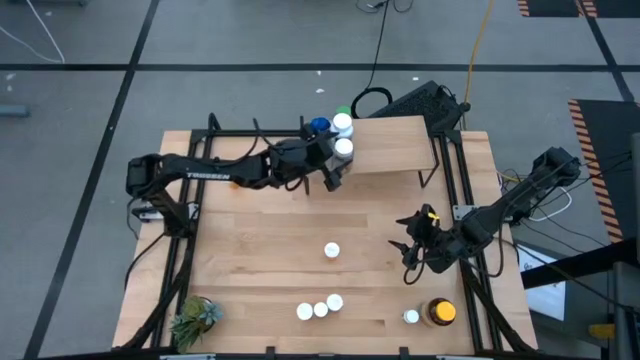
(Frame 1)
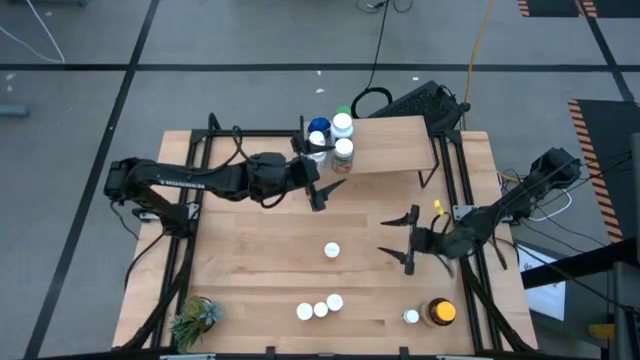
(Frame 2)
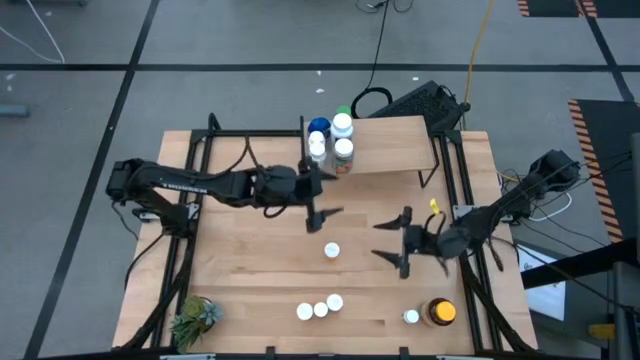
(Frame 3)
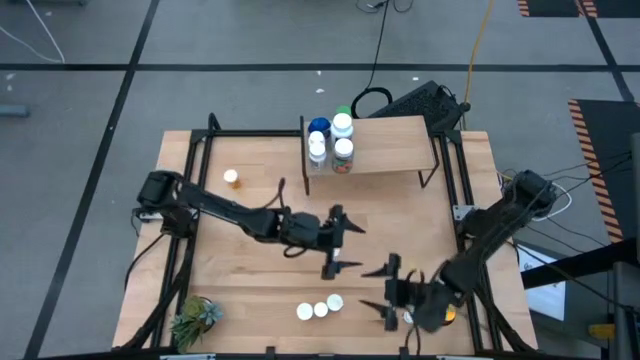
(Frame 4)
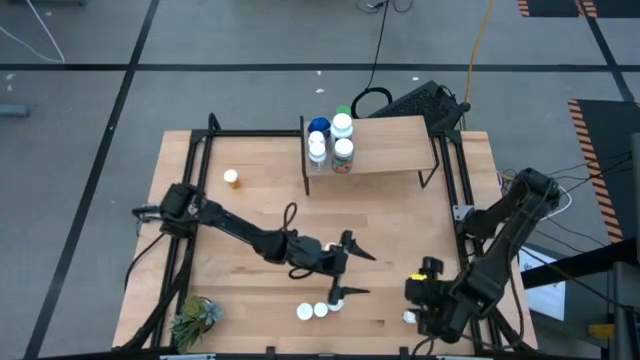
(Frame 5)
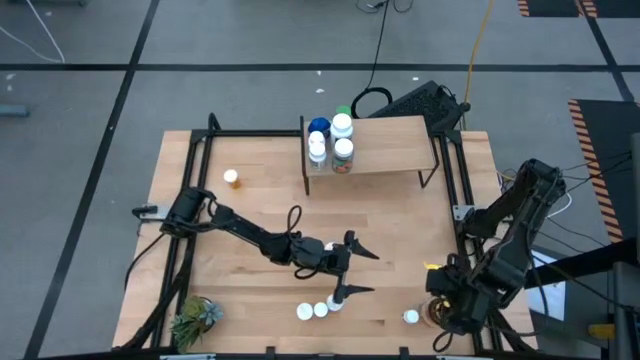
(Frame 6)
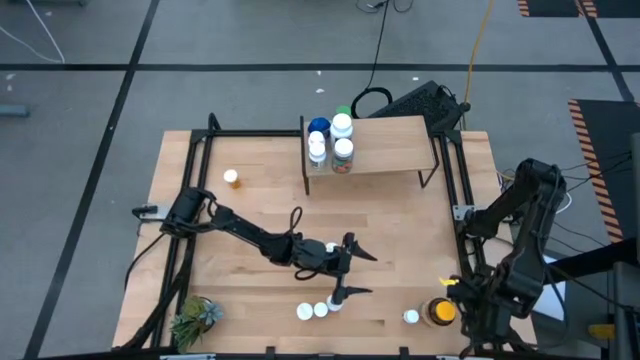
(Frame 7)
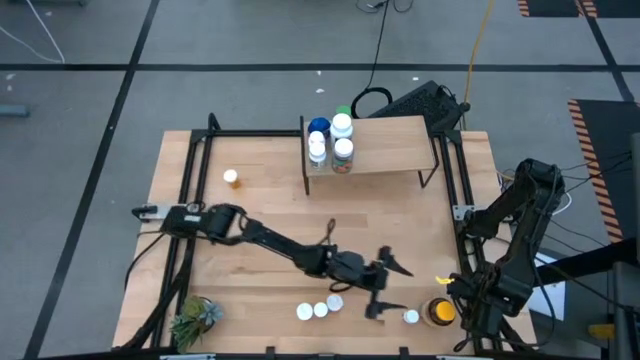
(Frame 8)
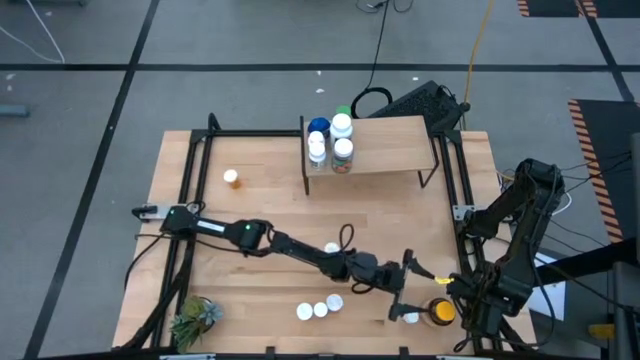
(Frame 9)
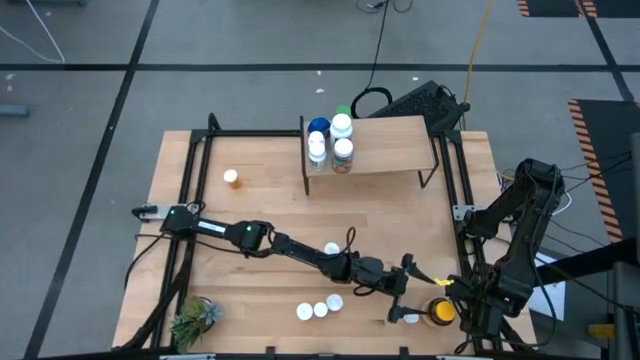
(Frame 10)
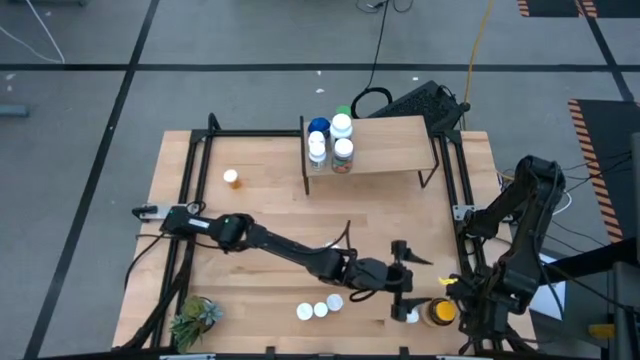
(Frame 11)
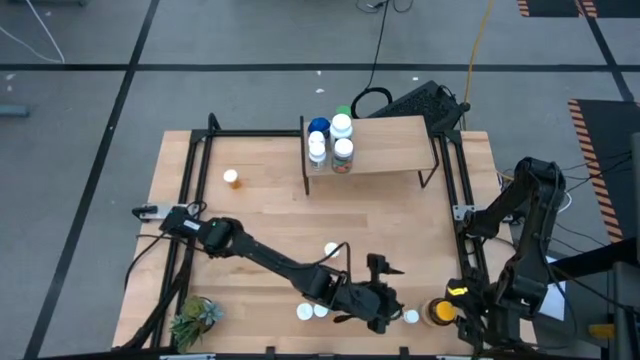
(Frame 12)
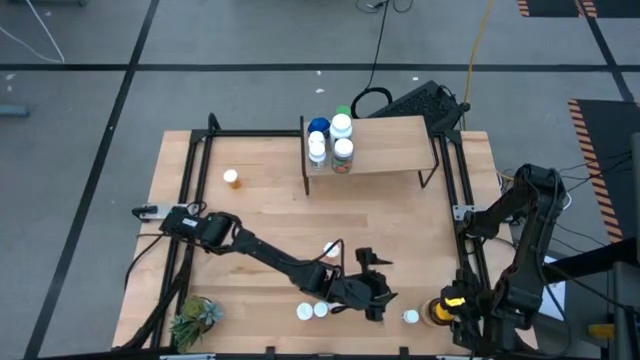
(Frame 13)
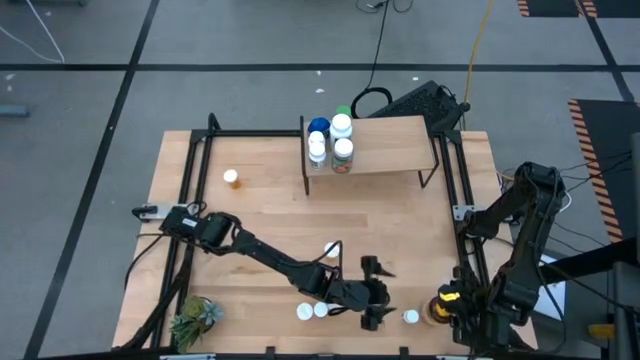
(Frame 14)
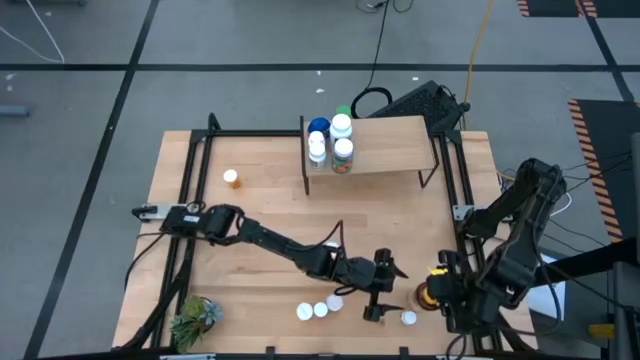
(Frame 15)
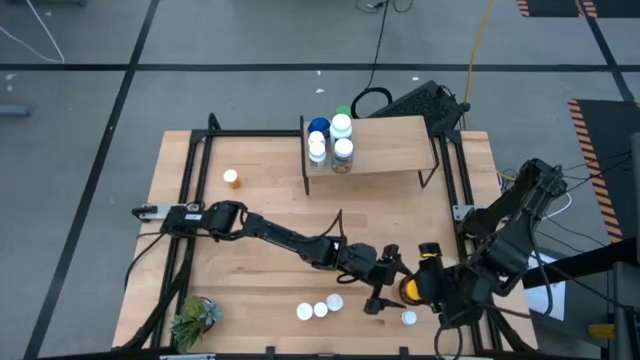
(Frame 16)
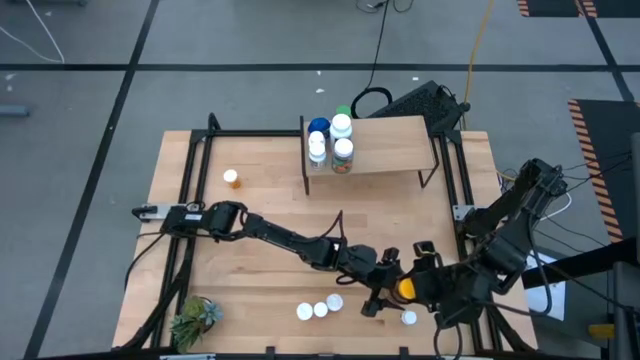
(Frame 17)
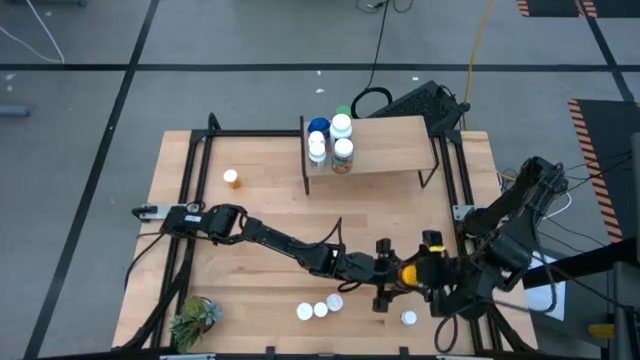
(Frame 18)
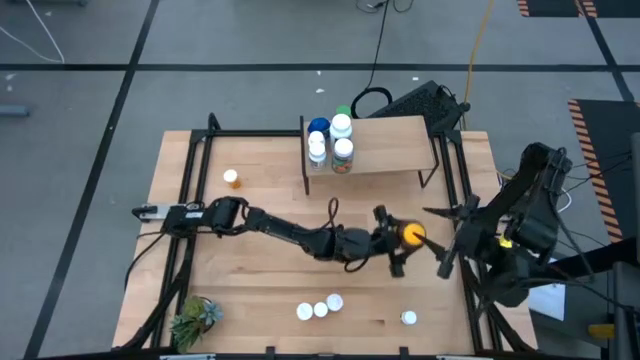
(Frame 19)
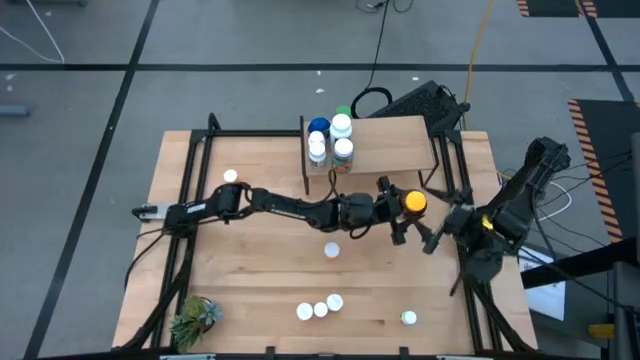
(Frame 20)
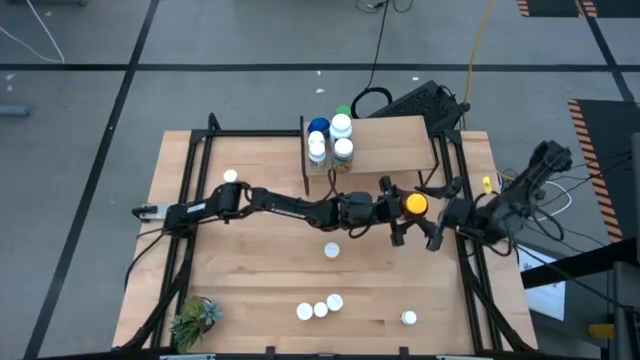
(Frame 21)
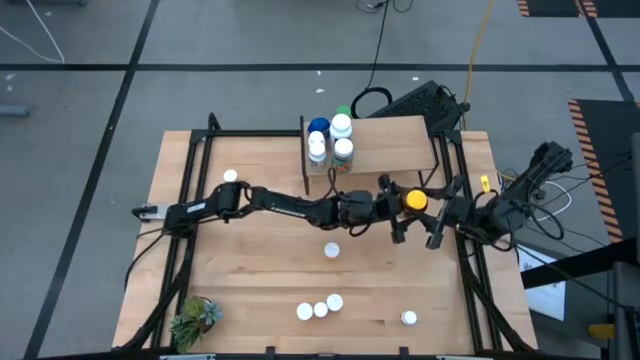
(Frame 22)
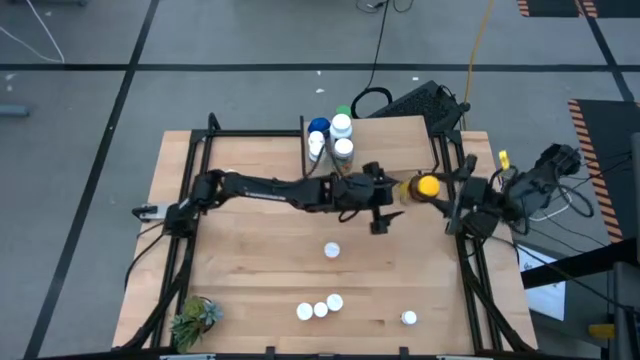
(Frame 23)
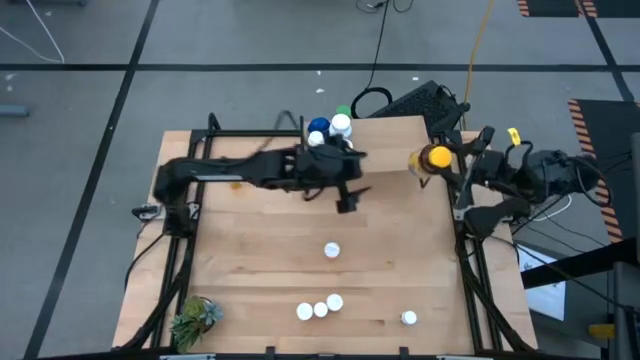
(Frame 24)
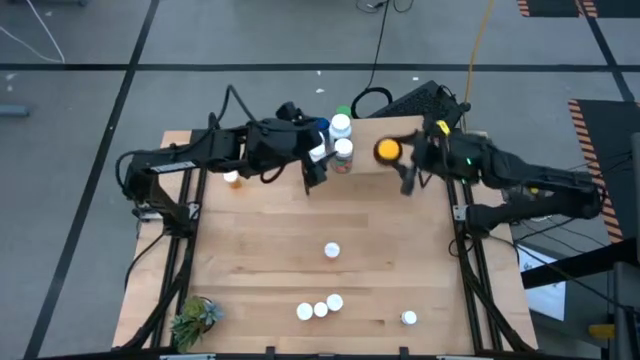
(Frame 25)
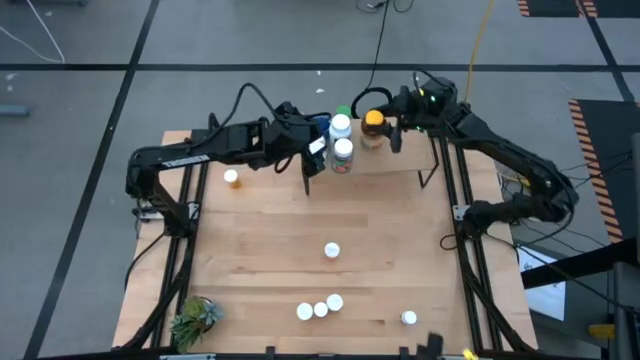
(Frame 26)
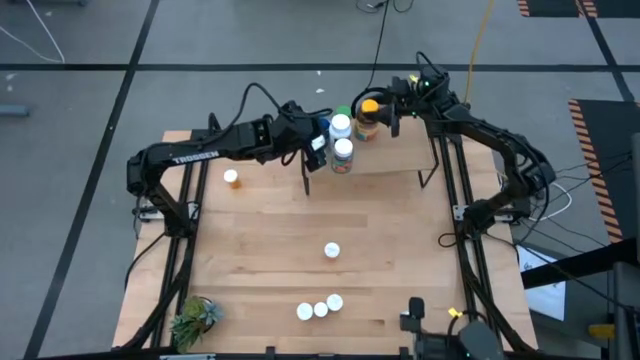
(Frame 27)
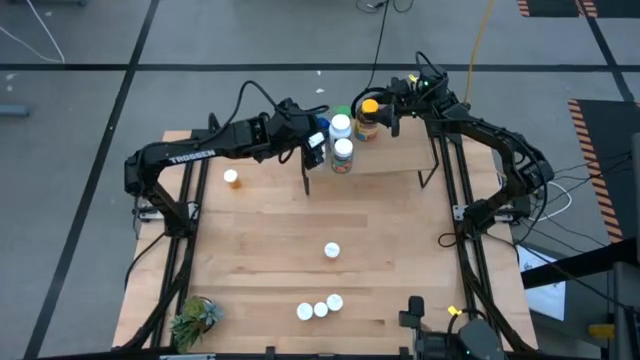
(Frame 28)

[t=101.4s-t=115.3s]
Task: Pick and place medicine bottles onto shelf by color
Put the yellow bottle on the shelf

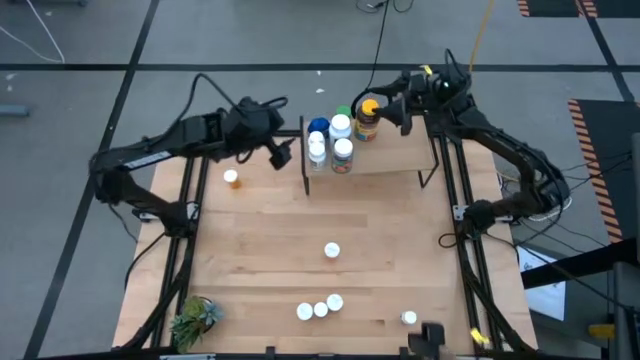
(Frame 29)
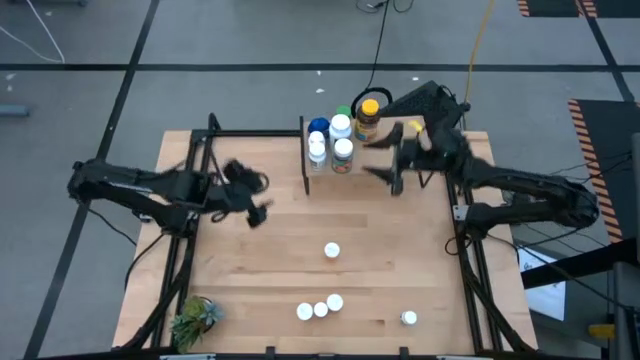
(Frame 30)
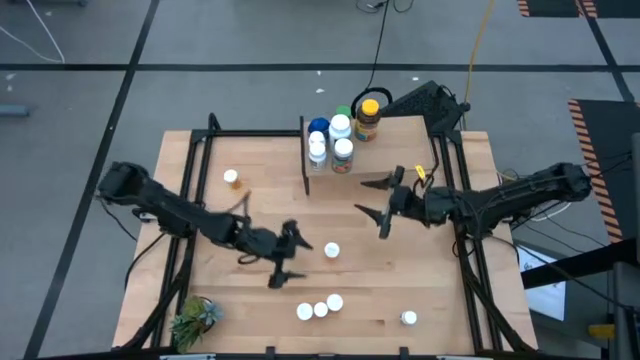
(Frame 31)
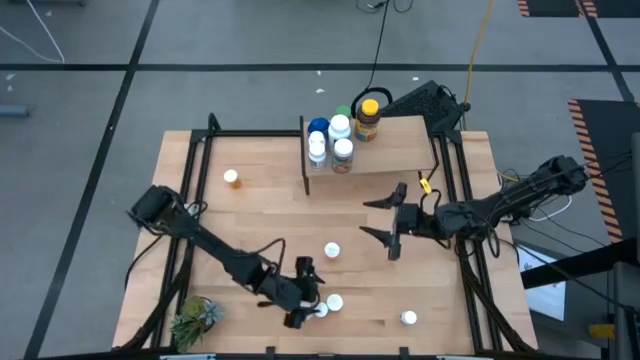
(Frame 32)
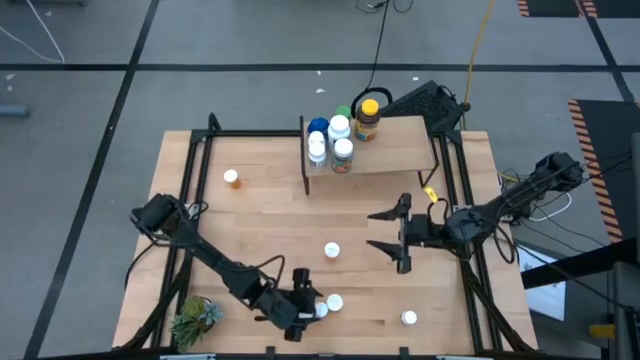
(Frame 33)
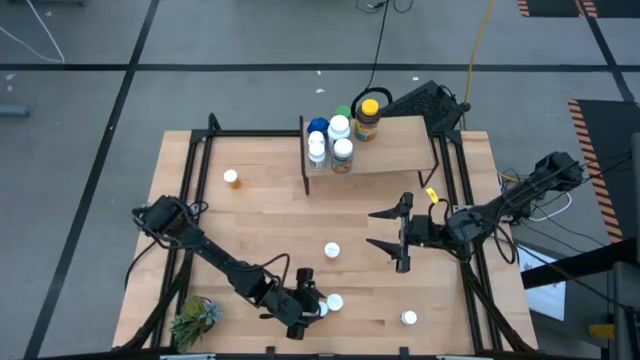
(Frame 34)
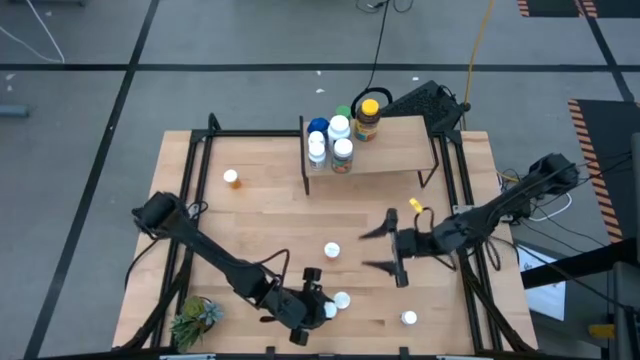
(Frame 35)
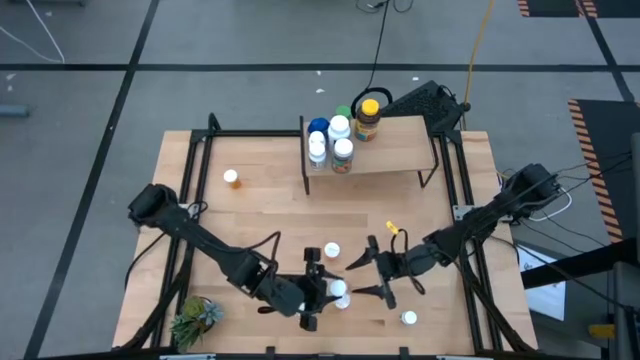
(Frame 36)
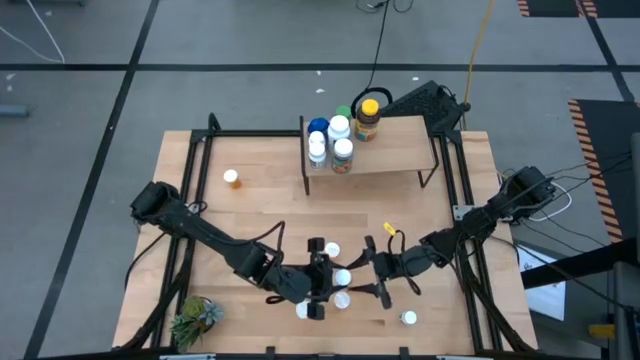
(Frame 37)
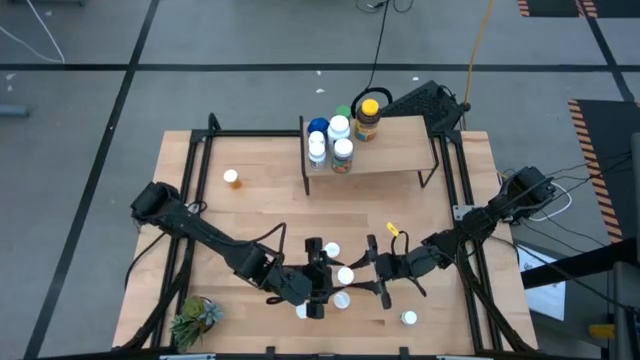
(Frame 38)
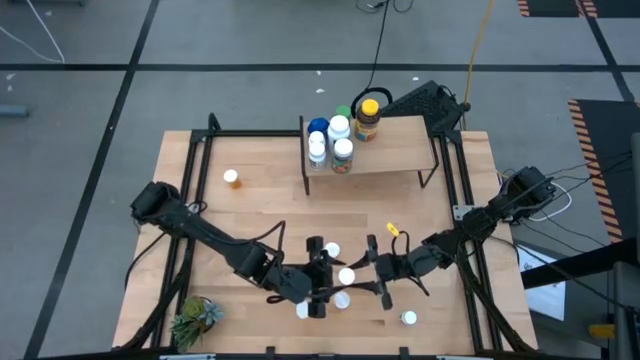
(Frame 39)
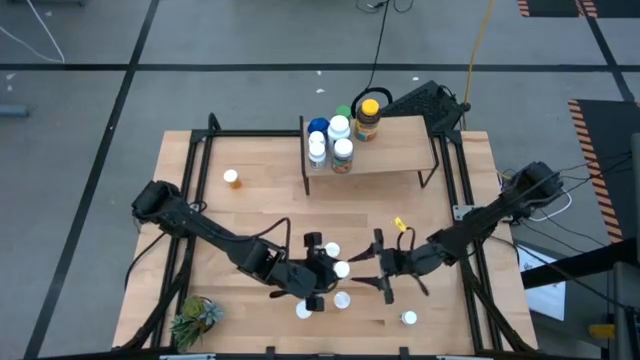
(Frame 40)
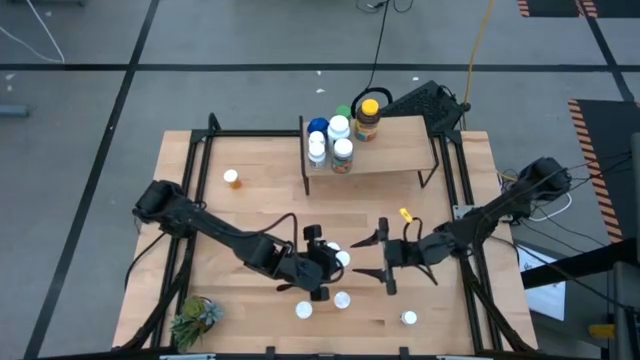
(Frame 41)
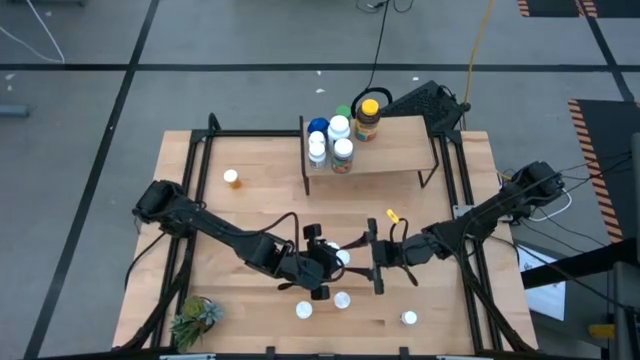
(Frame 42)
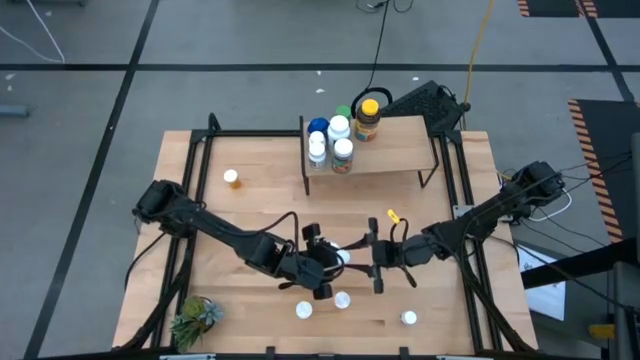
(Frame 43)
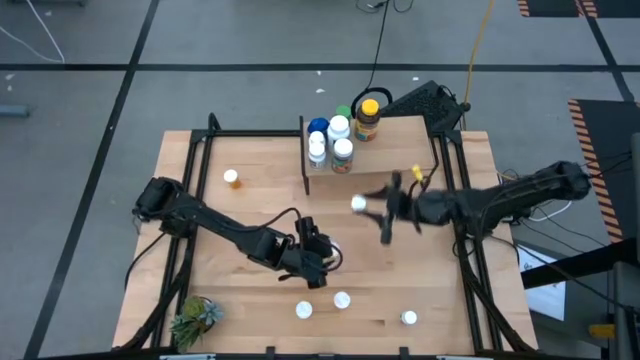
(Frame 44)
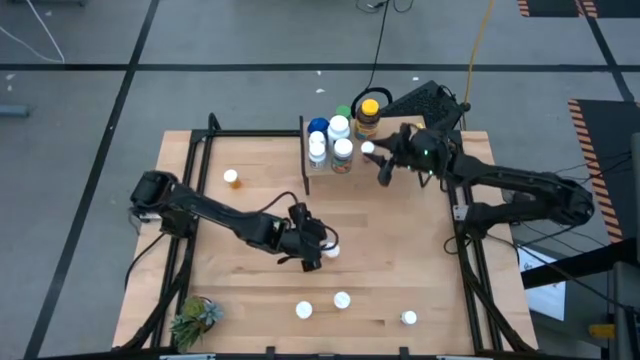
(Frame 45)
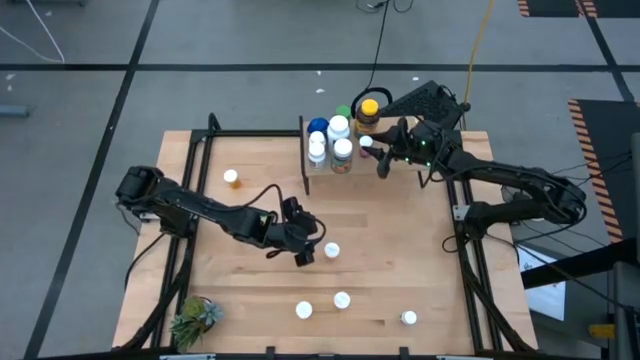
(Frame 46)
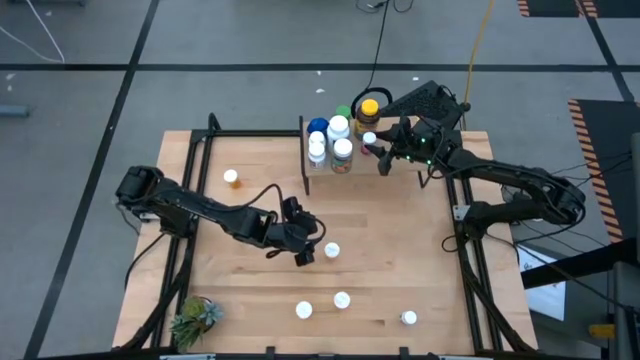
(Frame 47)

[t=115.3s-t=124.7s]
Put the pink bottle on the shelf
